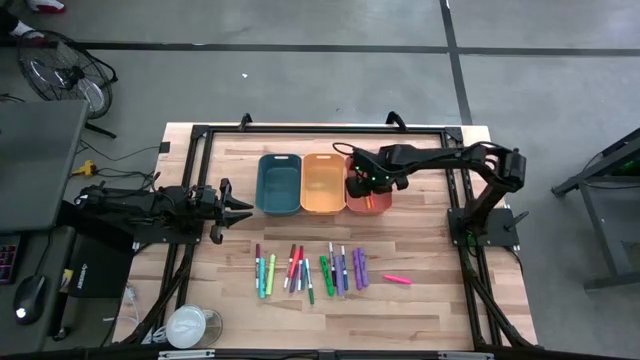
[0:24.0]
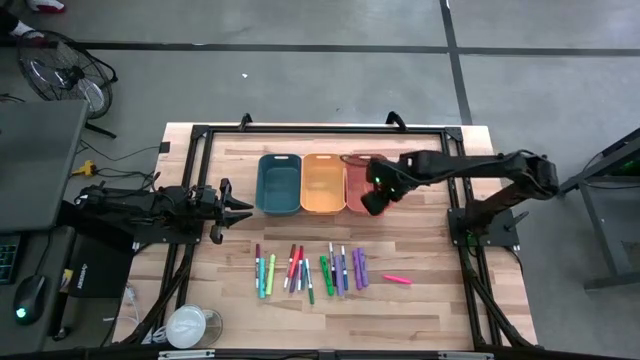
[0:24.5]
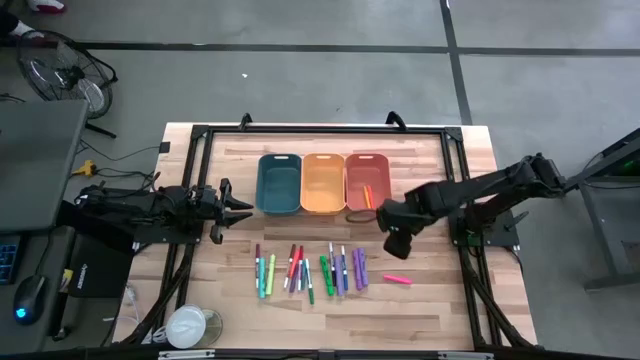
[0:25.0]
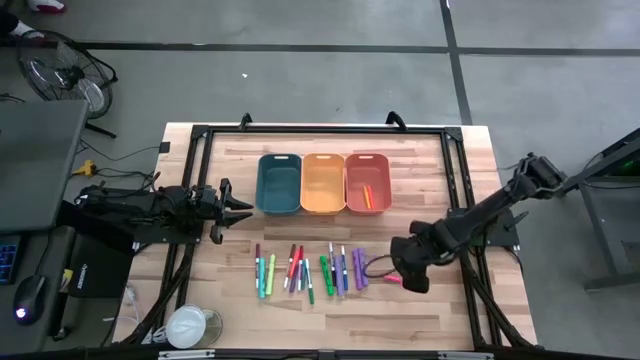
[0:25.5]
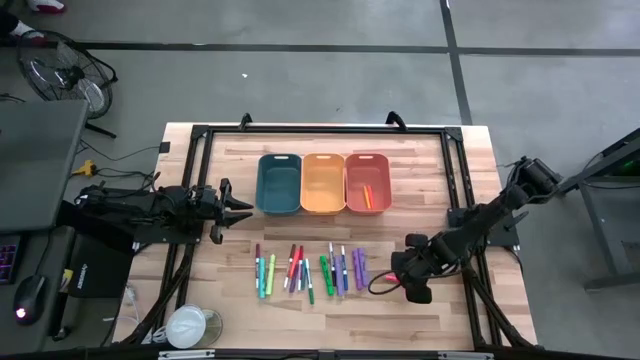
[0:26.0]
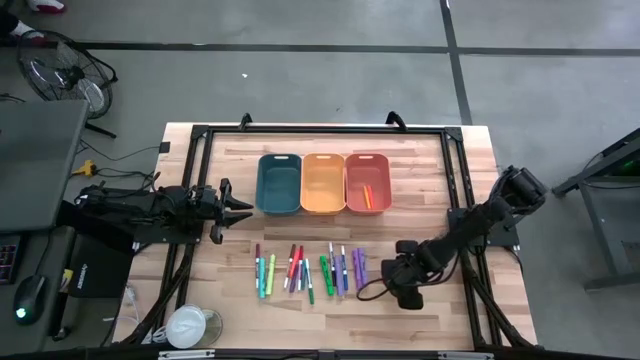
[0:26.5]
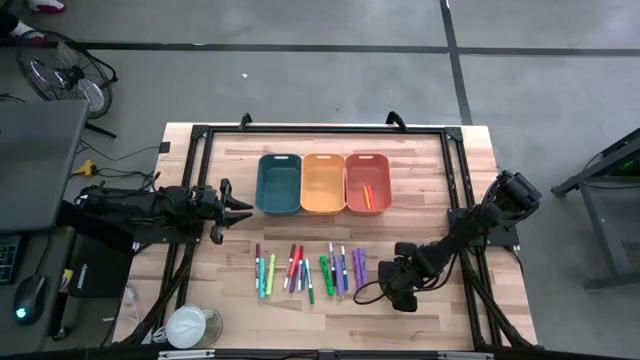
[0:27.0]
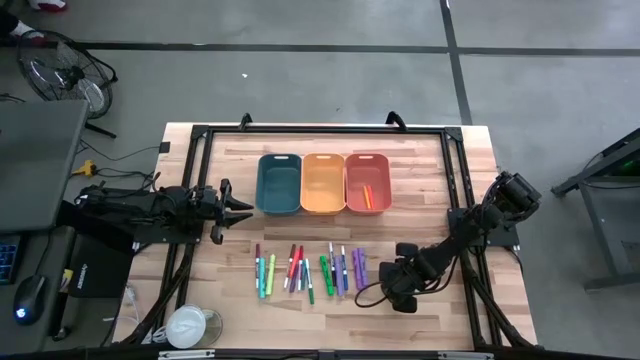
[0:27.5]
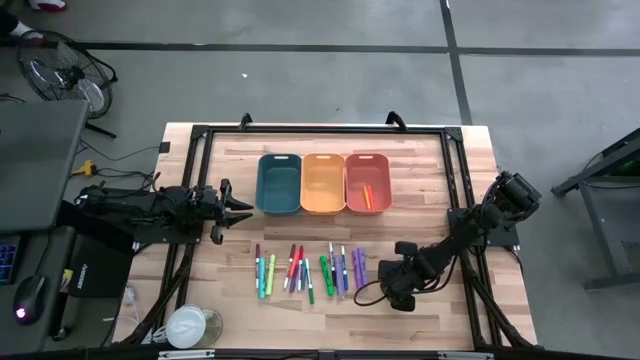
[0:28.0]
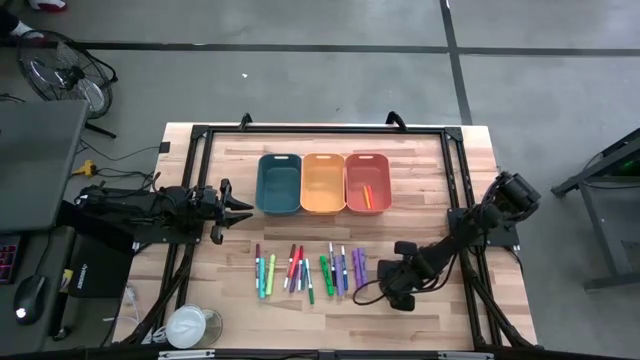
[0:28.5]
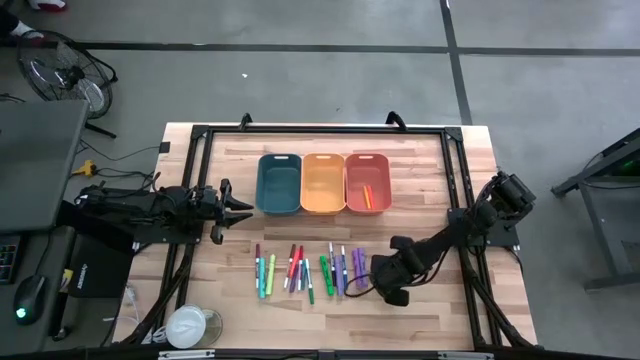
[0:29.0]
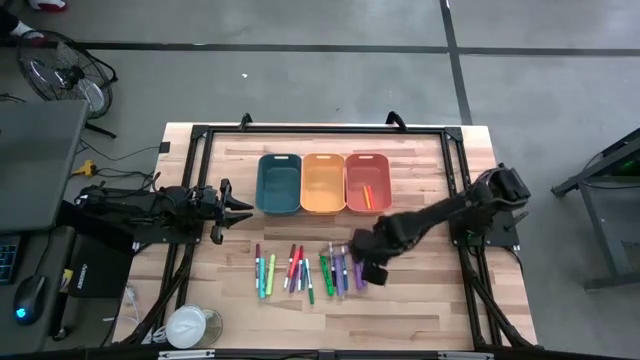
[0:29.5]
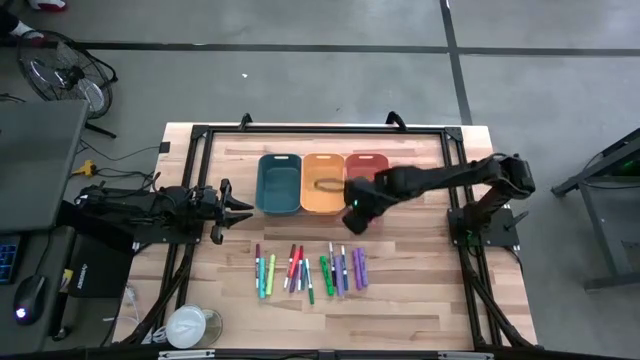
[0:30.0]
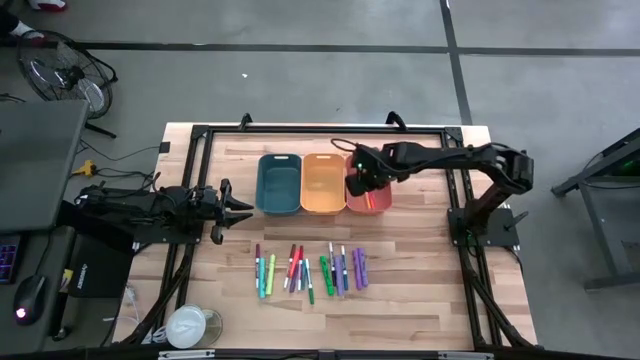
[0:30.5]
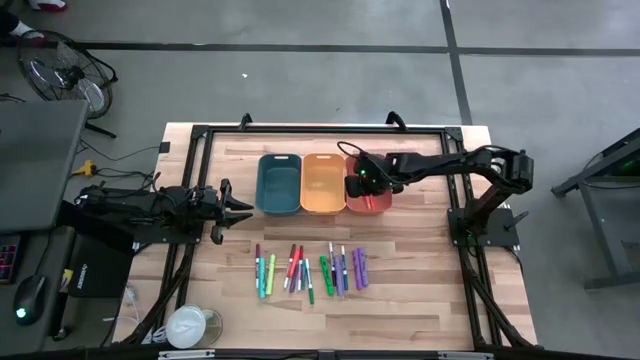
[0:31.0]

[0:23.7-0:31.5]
Task: Pick & Place Markers
Put the pink pen into the orange bin

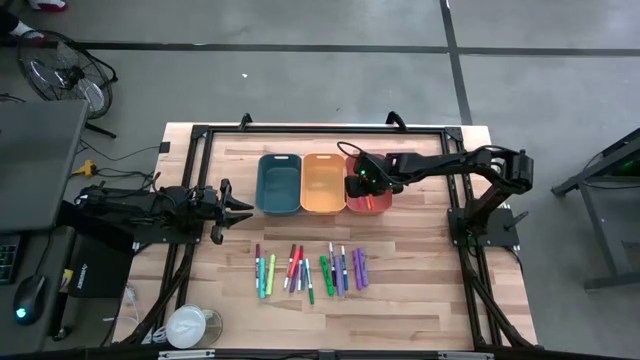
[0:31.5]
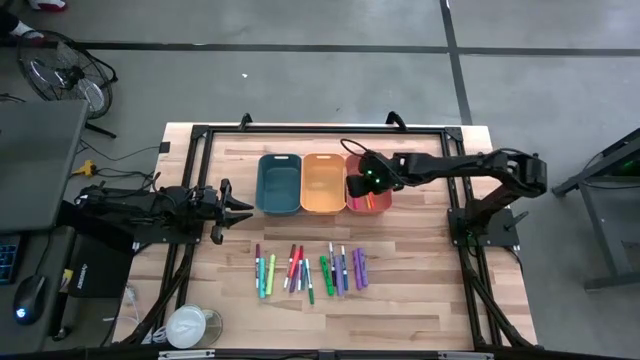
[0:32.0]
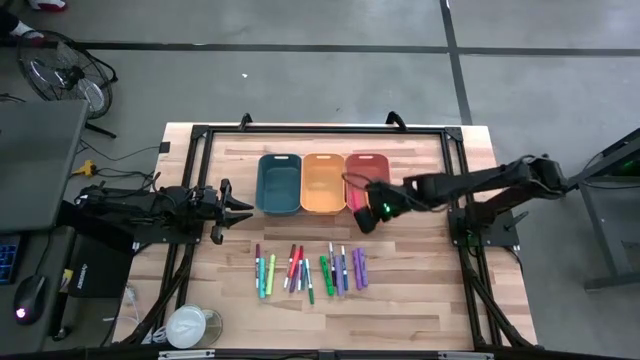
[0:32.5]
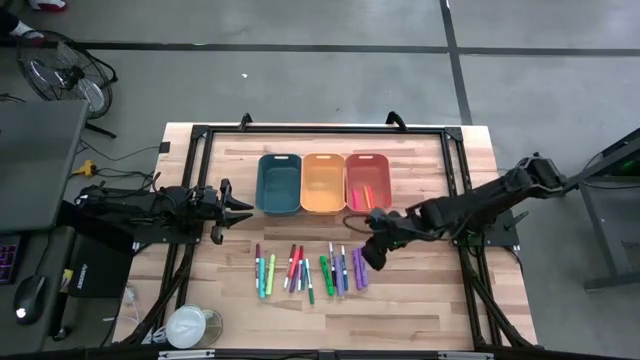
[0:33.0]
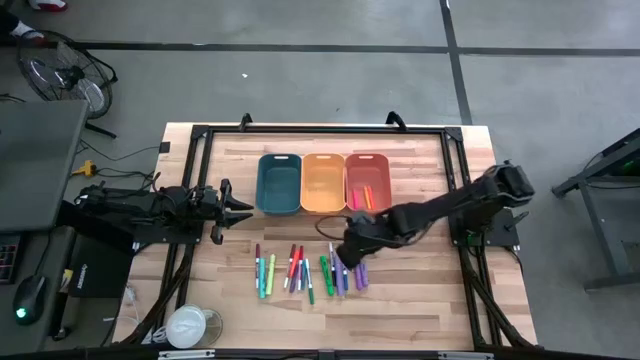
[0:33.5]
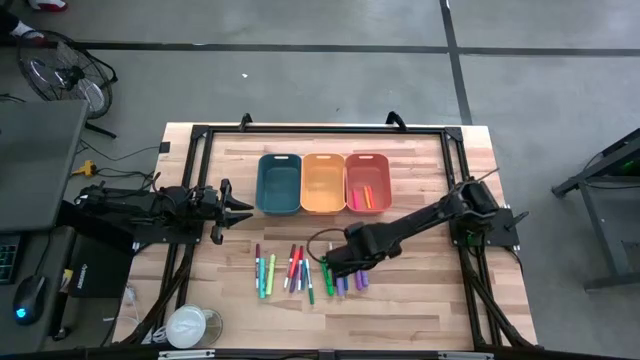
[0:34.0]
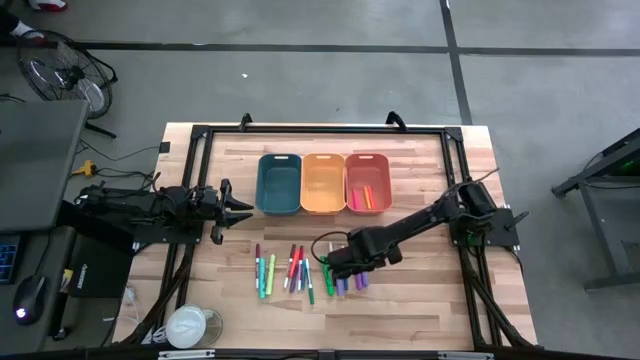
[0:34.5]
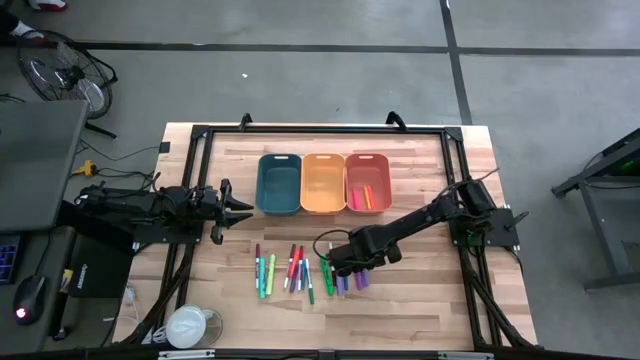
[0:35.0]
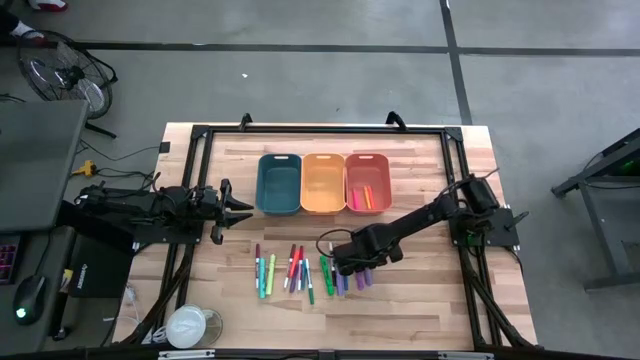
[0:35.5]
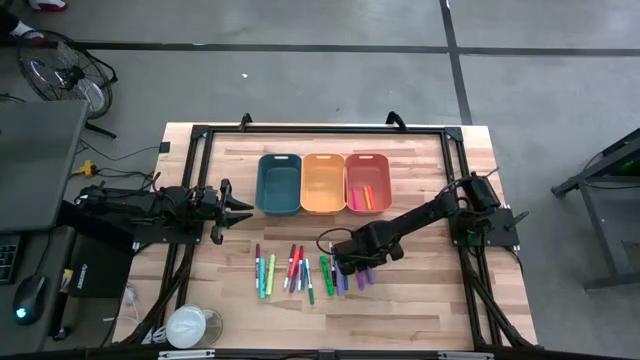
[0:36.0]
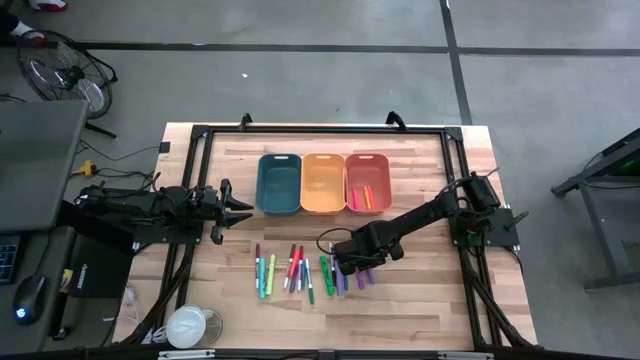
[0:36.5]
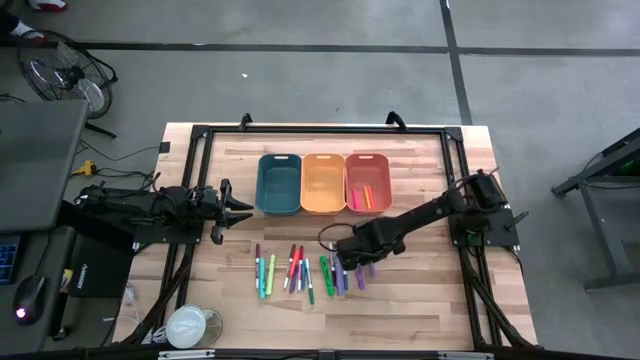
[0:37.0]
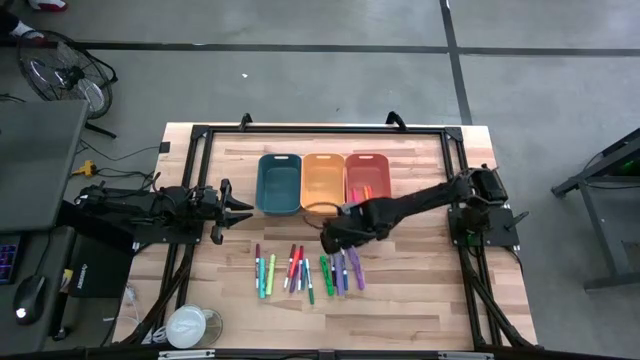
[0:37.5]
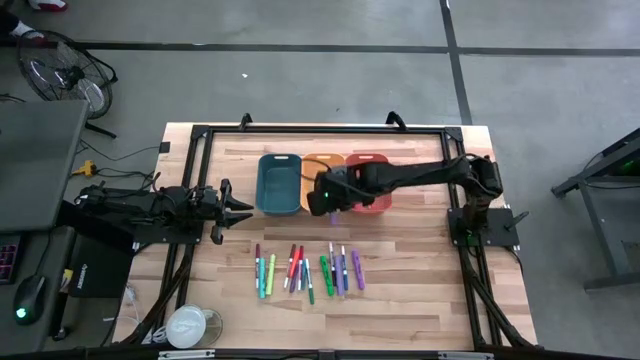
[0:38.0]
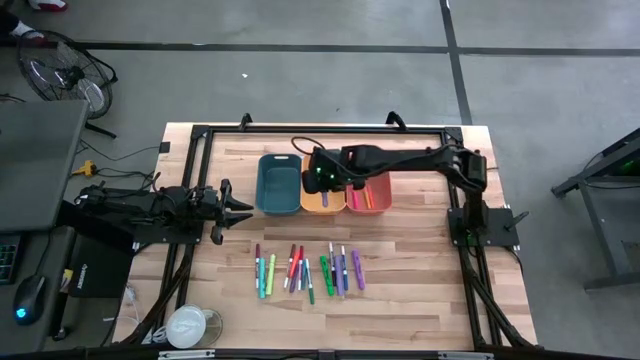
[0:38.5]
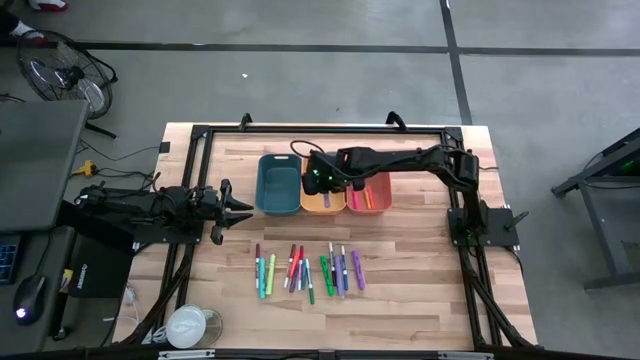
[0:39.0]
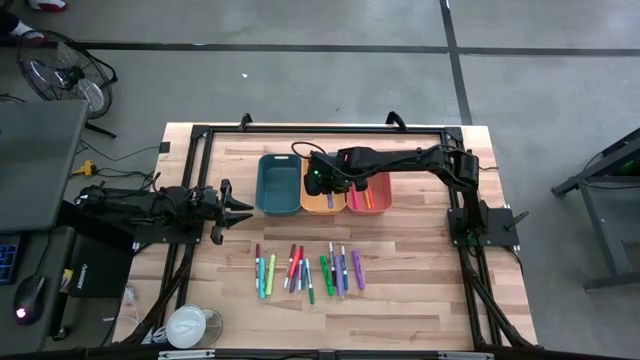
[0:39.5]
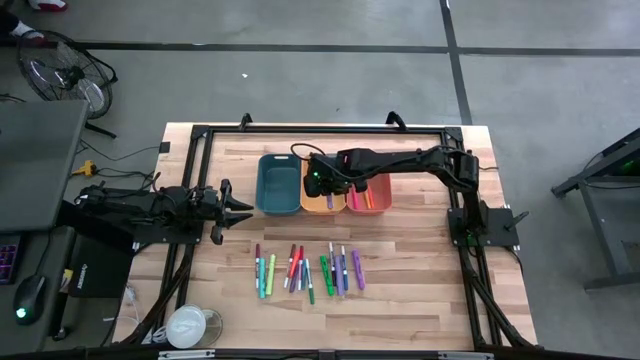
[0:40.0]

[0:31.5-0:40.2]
Put the light violet highlighter pen into the yellow bin

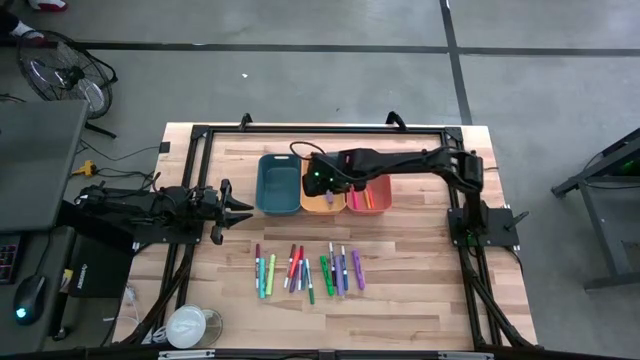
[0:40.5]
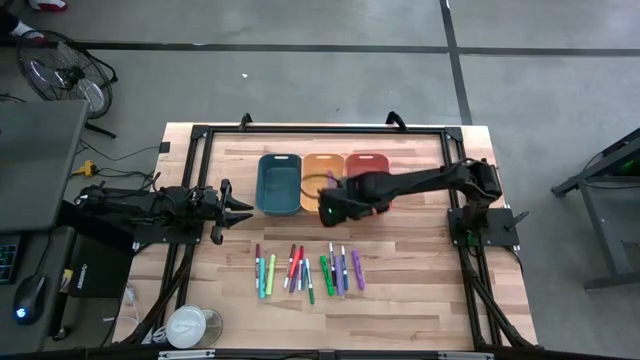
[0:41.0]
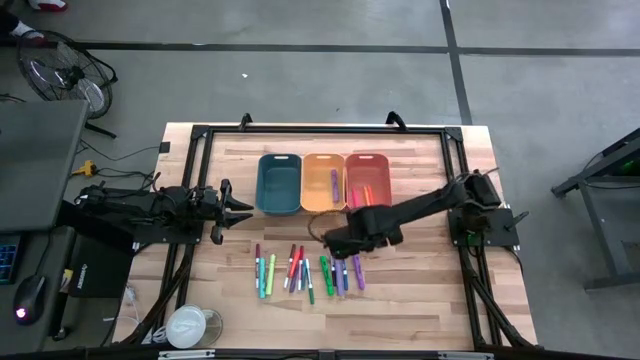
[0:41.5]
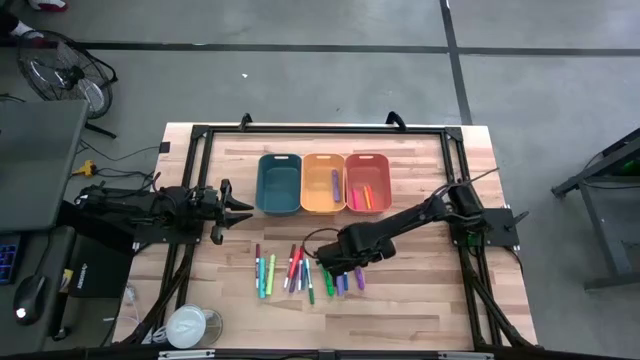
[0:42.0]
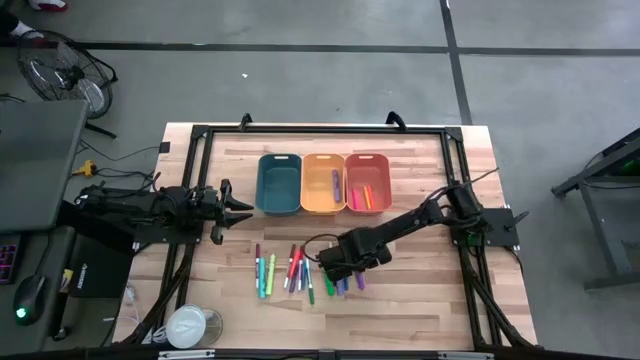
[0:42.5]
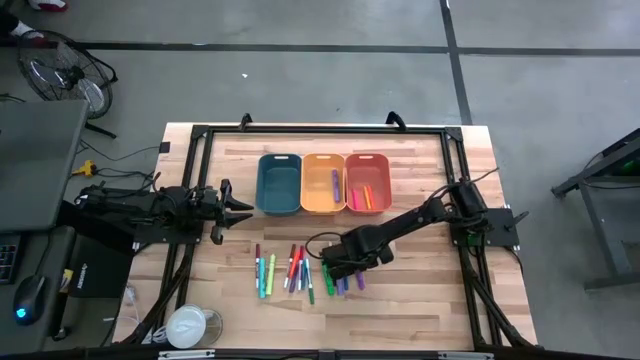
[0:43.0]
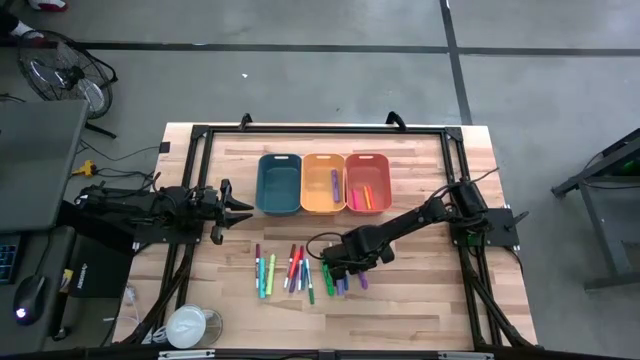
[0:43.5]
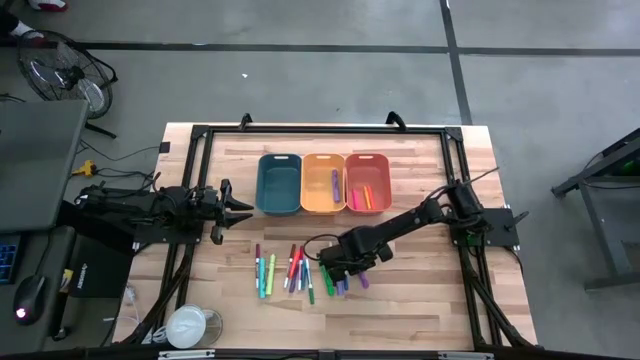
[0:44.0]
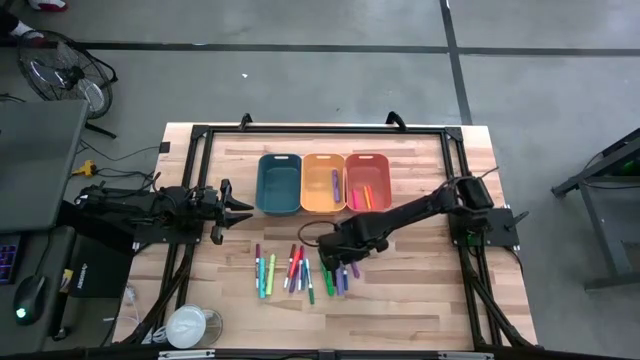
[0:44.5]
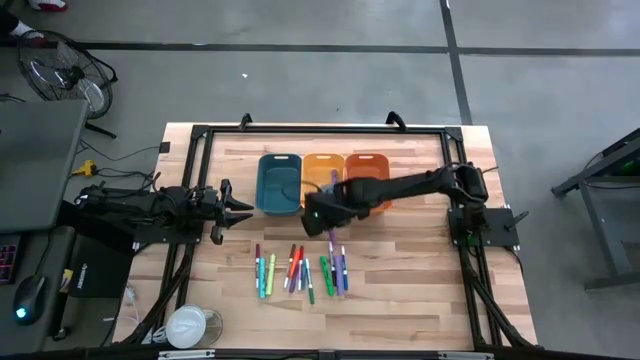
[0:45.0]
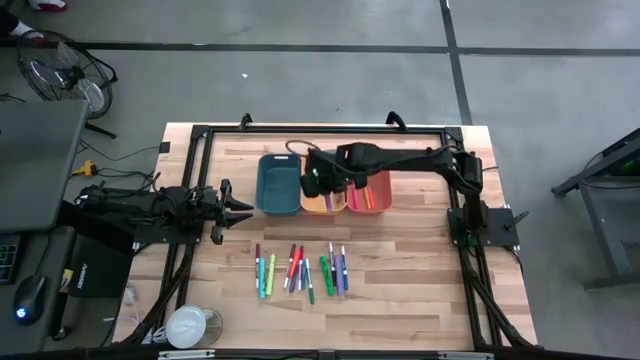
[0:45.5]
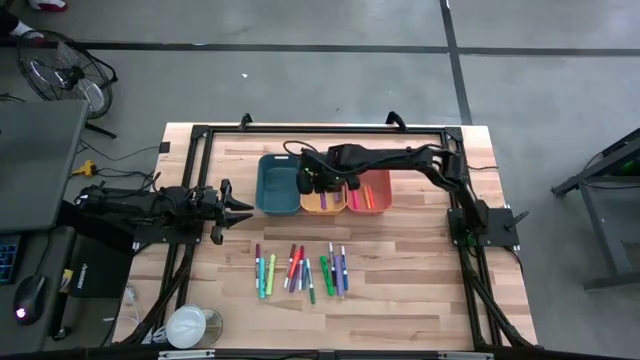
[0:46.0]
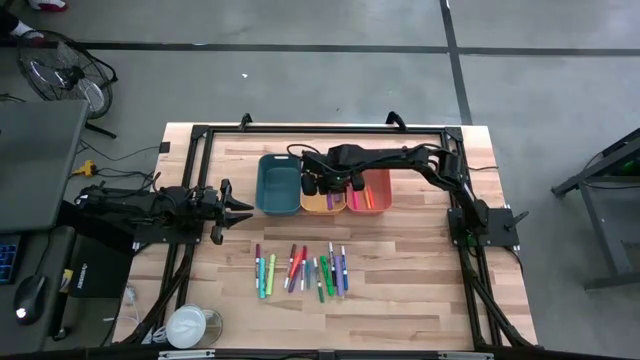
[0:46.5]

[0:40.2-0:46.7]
Put the violet highlighter pen into the yellow bin
